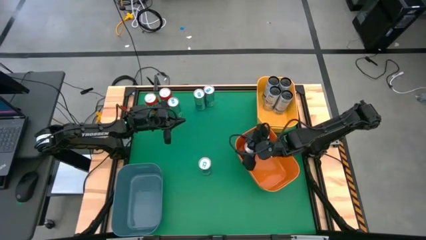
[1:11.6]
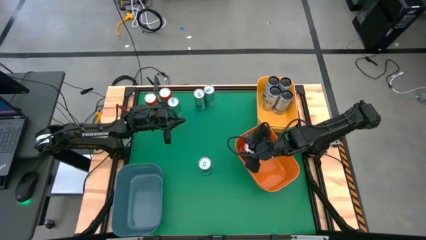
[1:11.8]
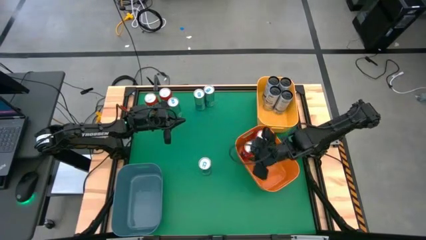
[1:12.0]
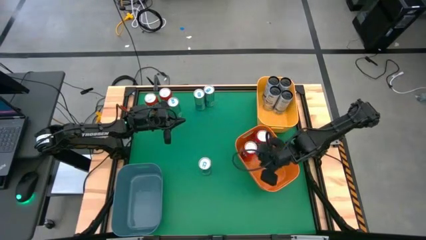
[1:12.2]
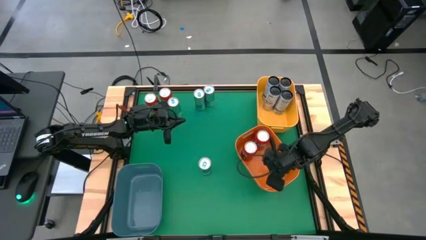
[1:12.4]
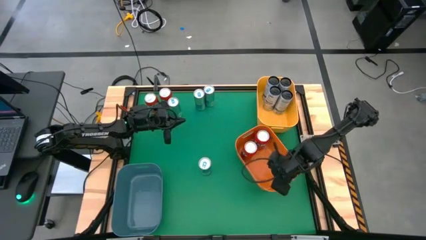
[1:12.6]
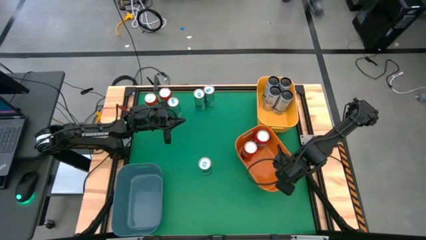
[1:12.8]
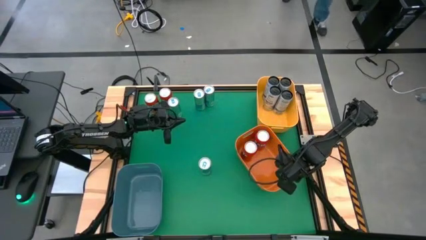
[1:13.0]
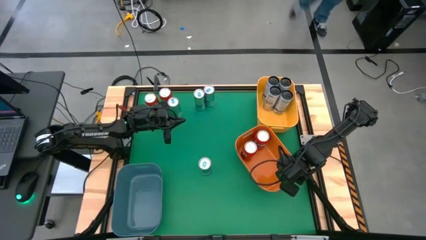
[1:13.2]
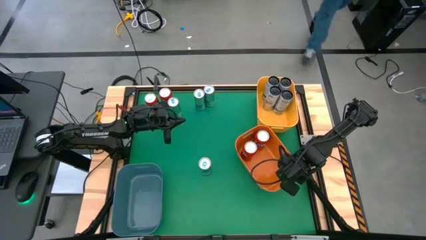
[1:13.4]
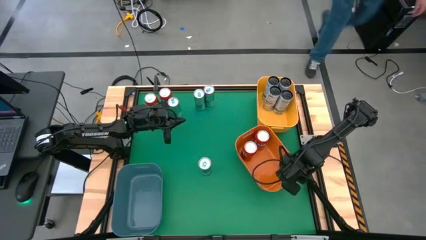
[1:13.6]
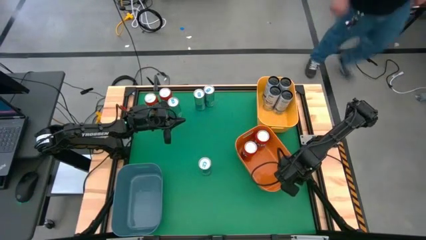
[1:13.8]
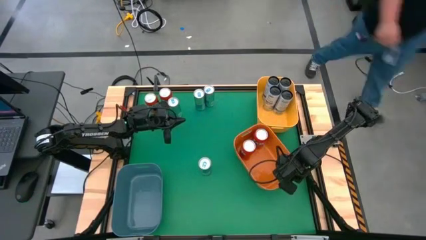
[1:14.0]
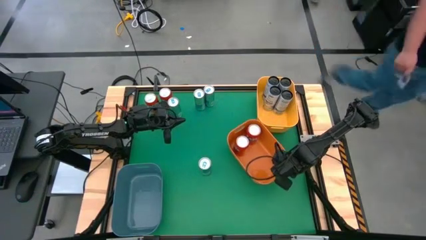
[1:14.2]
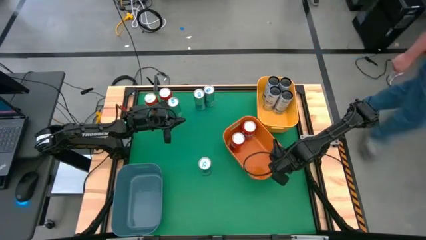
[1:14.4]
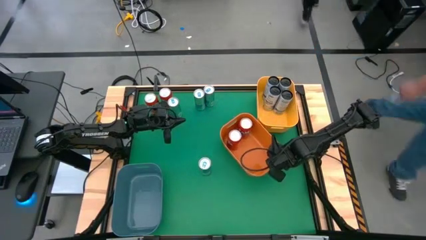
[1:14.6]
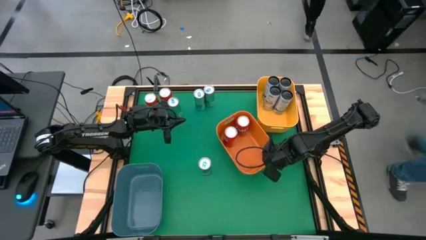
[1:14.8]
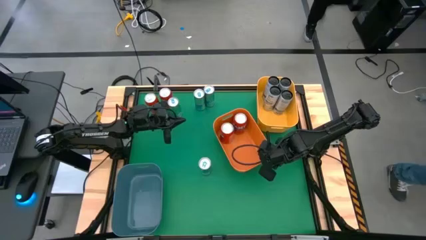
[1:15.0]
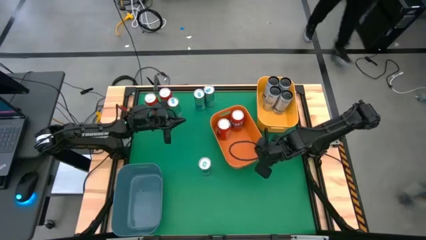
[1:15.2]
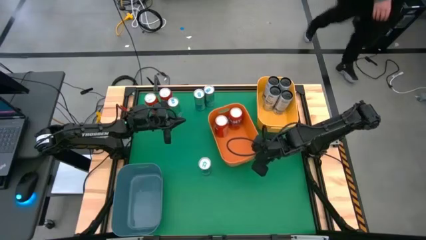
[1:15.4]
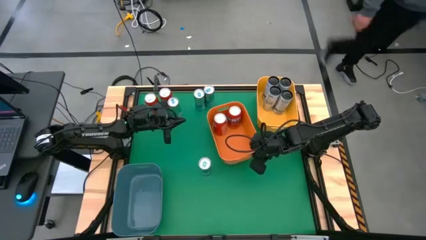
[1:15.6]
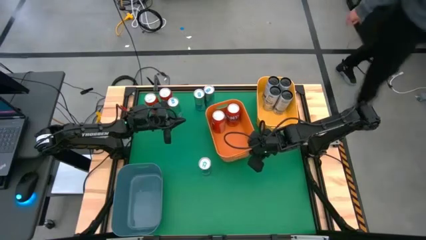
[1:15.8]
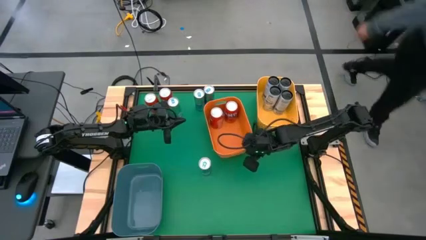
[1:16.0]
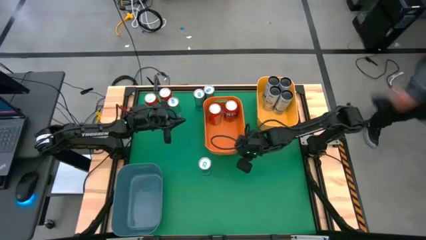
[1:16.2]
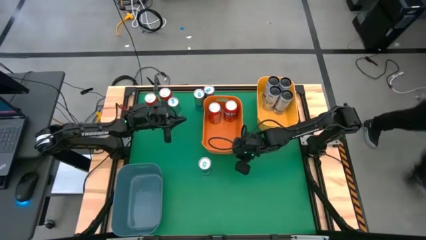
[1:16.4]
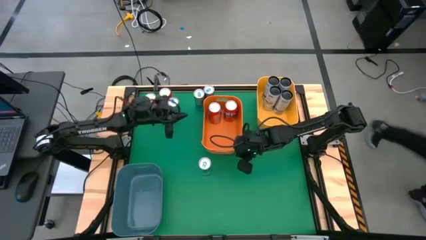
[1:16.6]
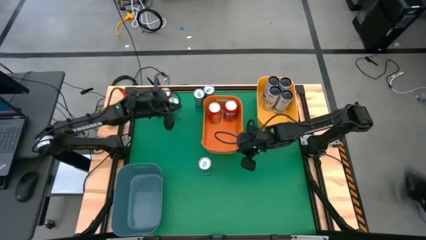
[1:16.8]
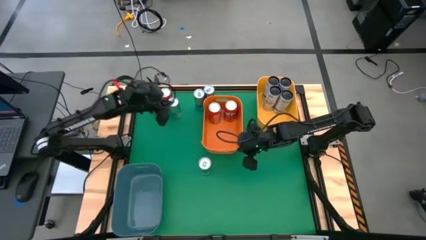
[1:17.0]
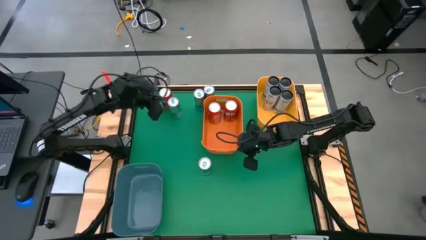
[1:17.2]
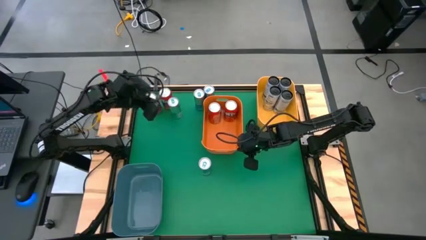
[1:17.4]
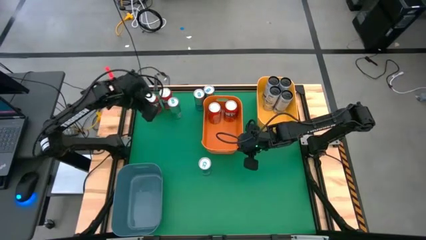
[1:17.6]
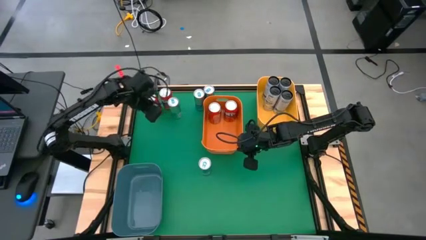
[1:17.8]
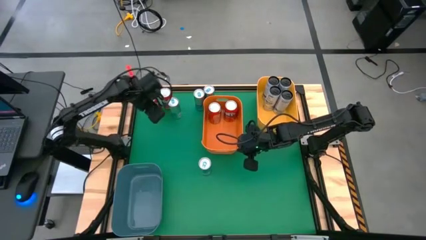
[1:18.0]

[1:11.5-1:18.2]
Task: Sort soda cans
Move the orange bin to the center

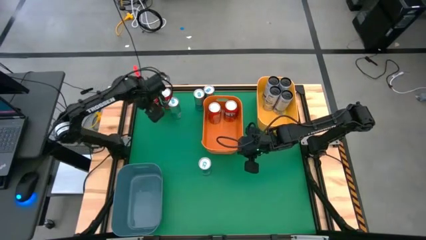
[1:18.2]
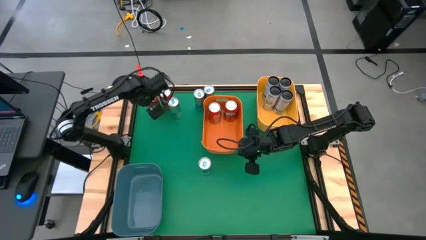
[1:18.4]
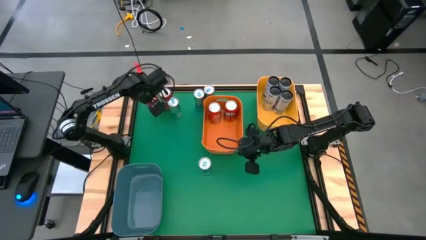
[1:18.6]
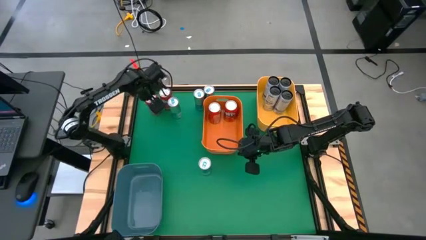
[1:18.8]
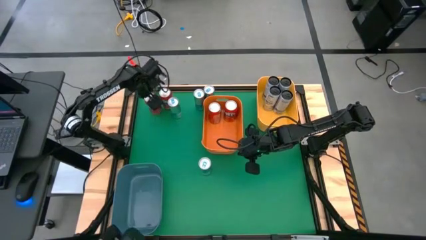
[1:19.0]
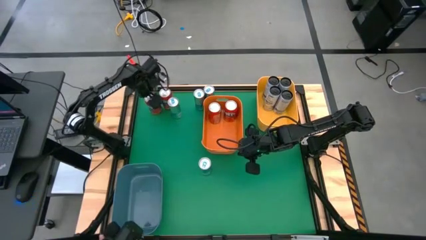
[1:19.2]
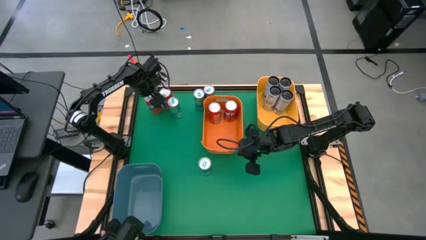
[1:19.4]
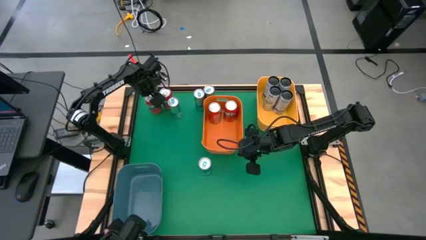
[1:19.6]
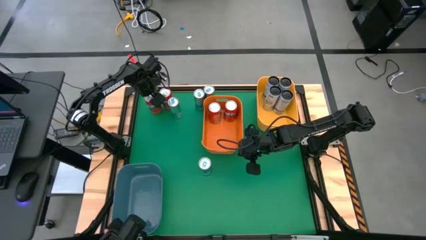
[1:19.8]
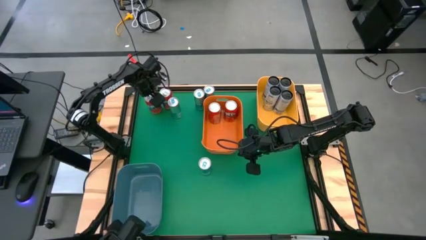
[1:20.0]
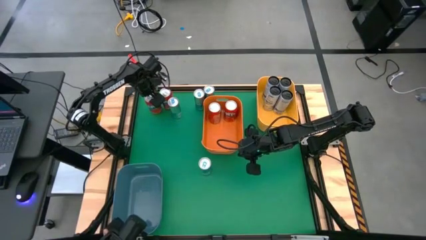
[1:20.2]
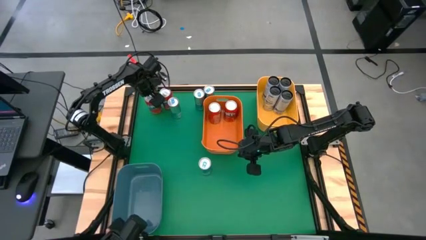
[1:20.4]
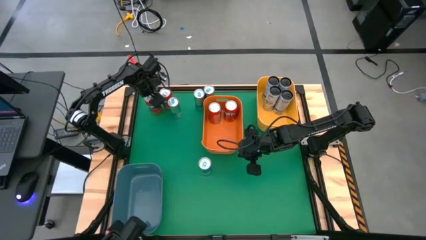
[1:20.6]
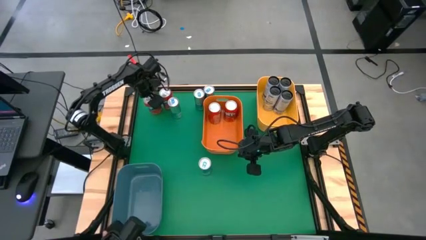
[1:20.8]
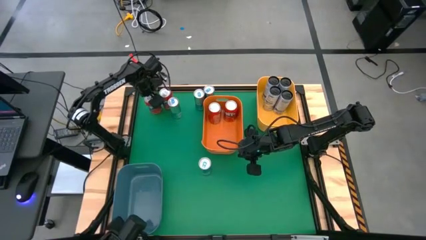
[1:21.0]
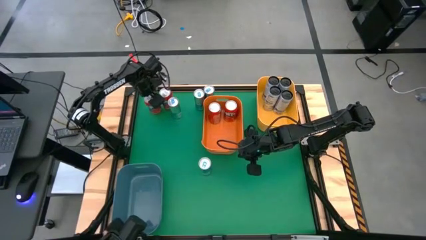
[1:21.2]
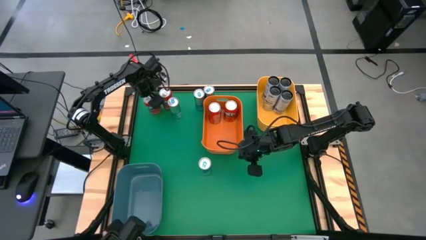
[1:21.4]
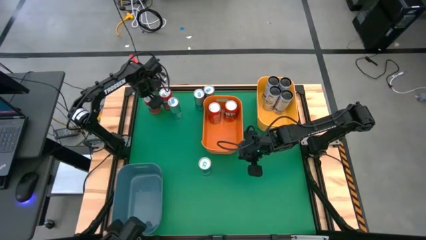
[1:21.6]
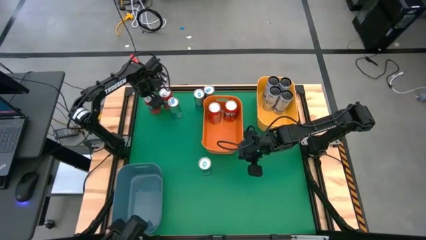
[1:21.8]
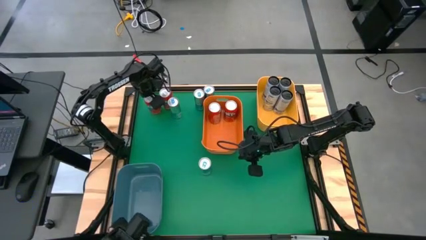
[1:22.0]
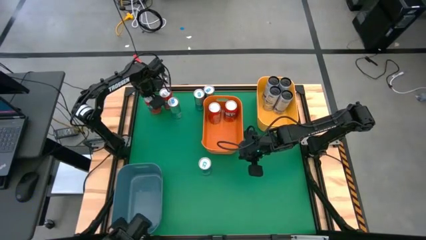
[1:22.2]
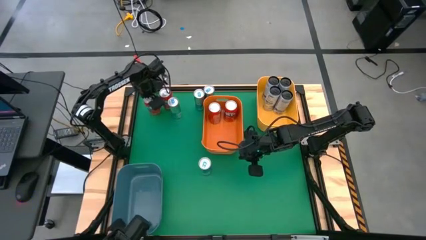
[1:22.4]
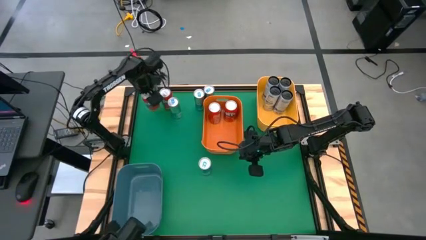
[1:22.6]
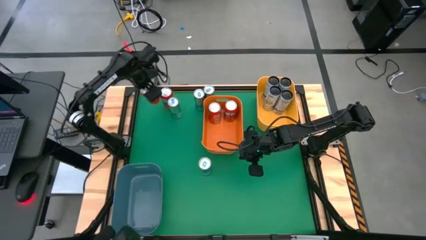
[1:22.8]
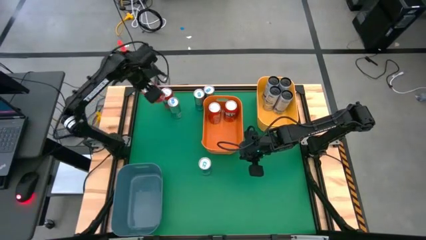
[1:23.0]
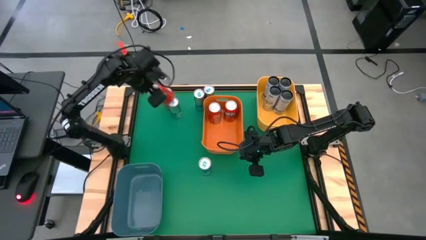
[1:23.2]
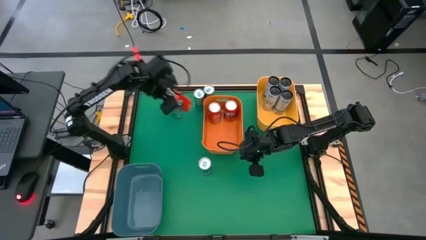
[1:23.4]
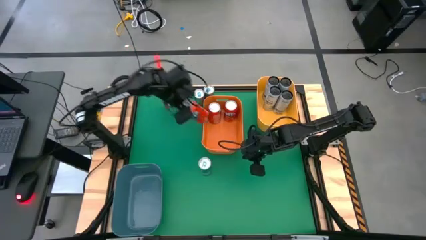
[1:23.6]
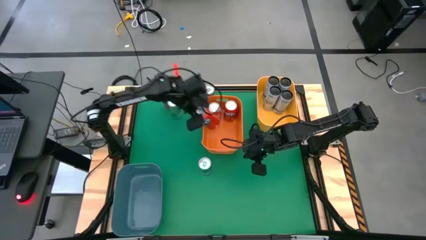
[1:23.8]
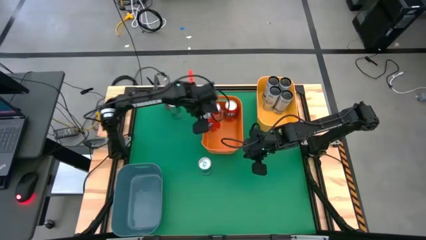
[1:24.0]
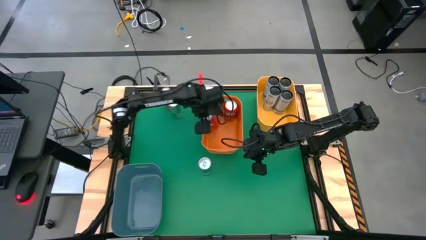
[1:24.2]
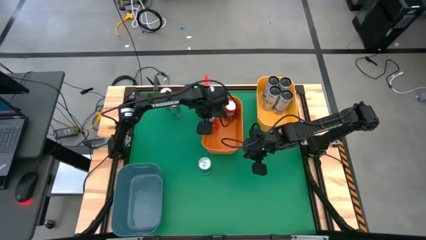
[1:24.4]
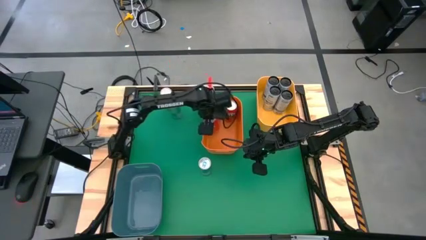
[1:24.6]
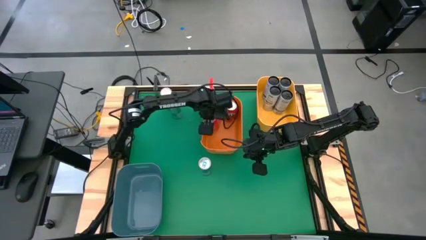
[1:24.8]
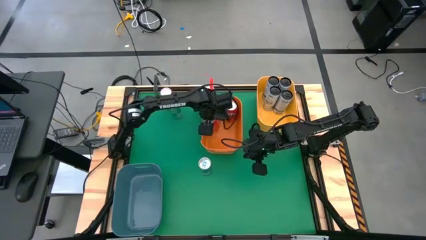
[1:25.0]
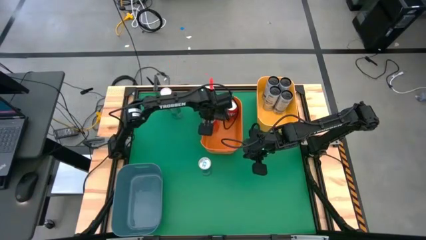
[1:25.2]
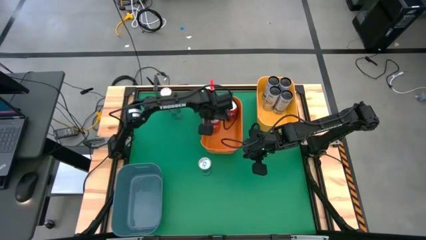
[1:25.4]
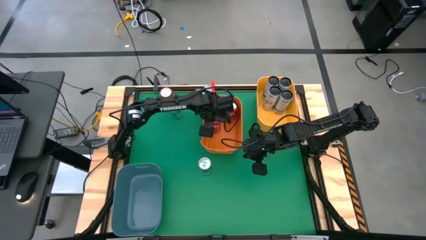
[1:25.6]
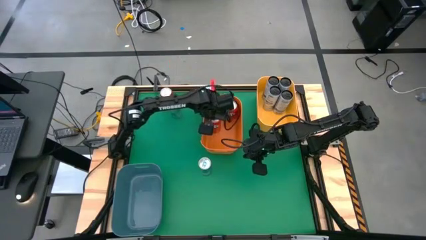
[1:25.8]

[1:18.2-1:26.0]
Put the orange soda can into the orange bin

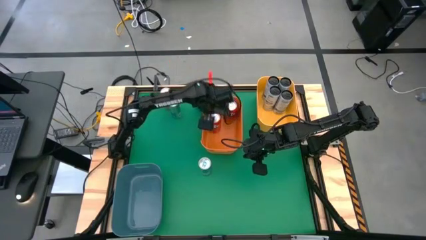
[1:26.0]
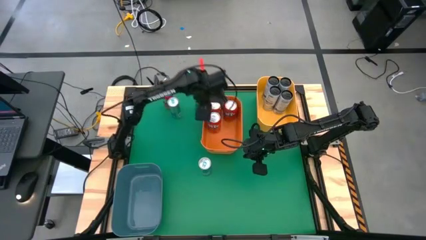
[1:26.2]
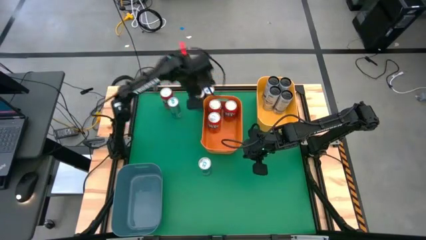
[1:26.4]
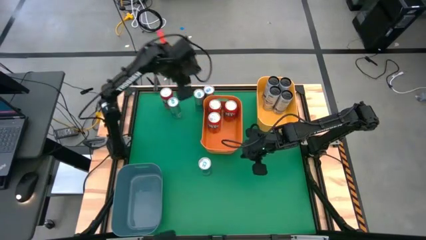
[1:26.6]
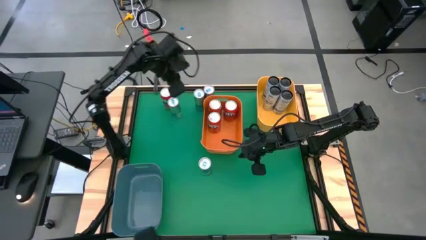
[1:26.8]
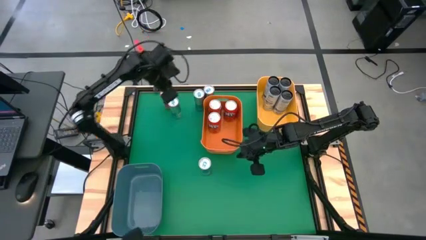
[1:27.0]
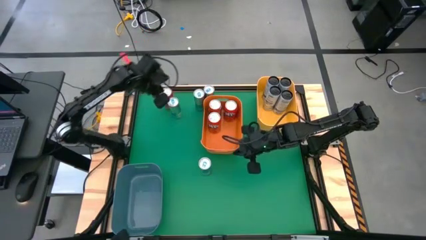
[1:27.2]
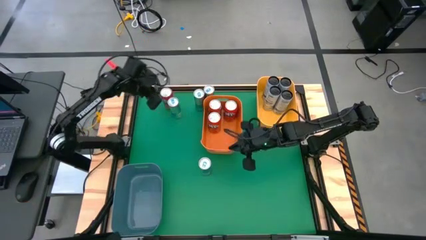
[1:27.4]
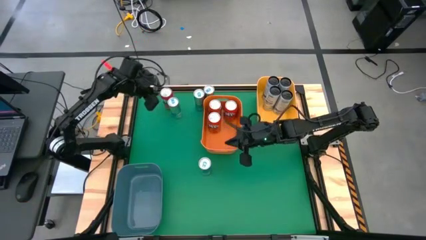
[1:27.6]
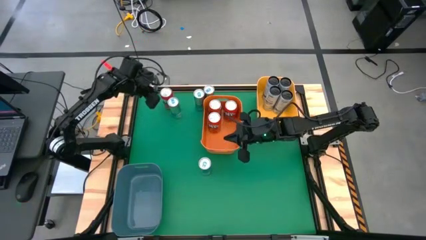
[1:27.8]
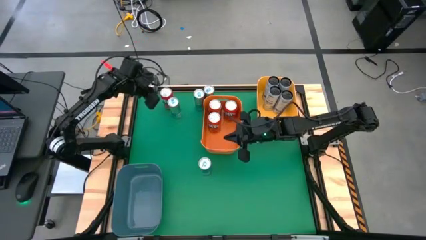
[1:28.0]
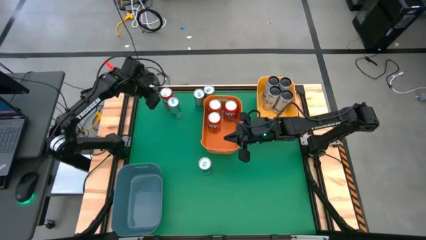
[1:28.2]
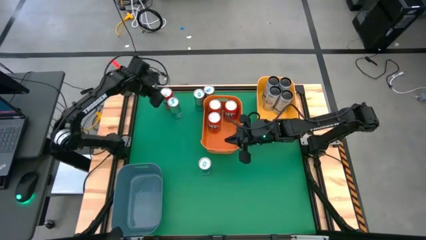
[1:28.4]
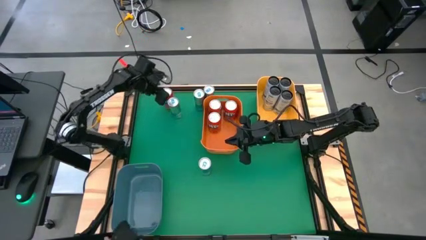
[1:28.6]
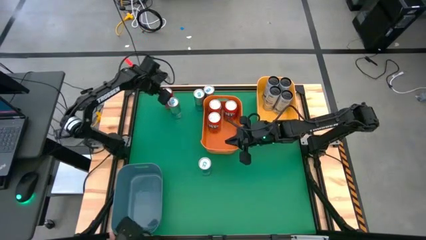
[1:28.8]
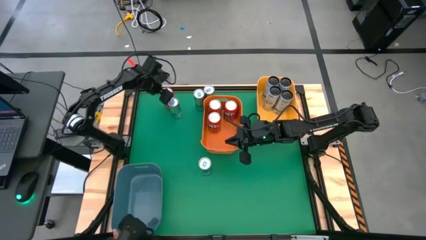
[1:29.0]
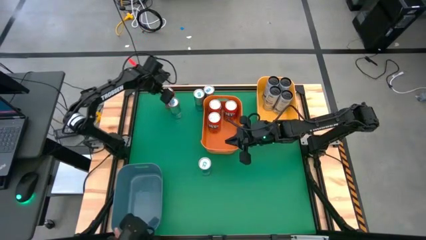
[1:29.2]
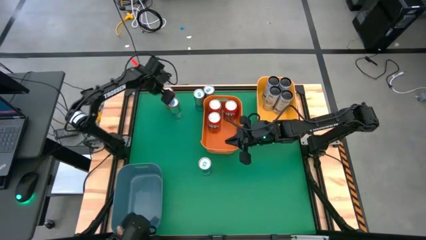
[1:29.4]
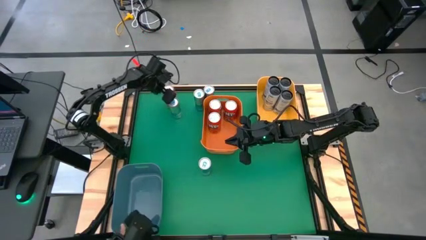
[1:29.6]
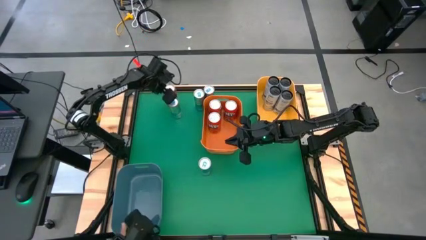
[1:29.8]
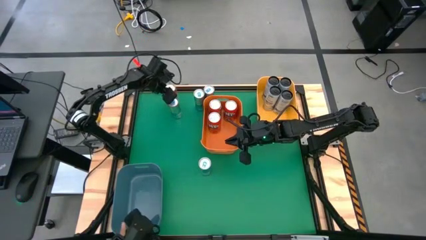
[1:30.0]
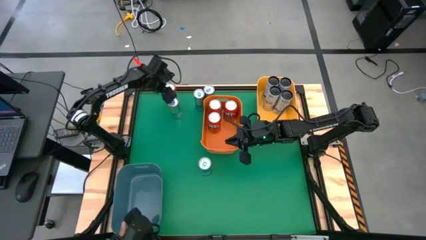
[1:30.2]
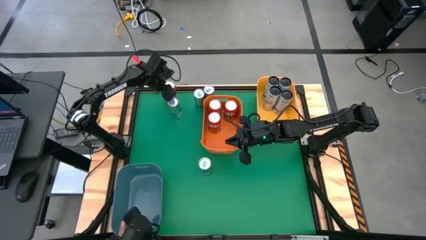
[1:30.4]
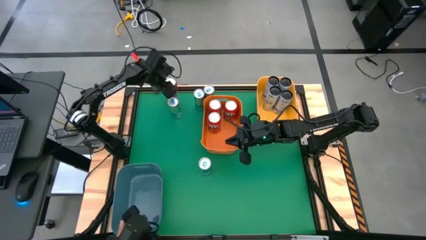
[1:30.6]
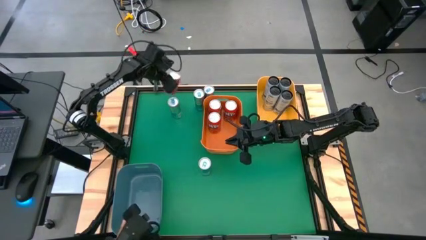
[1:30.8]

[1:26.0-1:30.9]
Put the orange soda can into the orange bin
